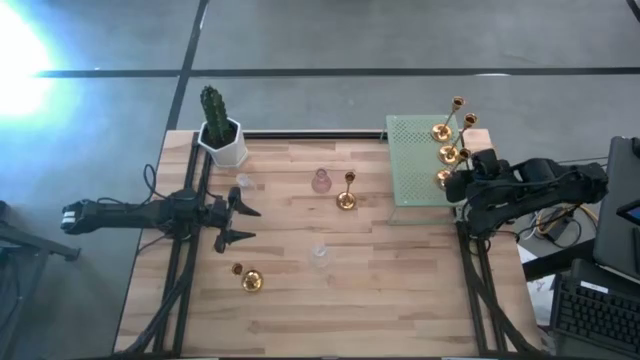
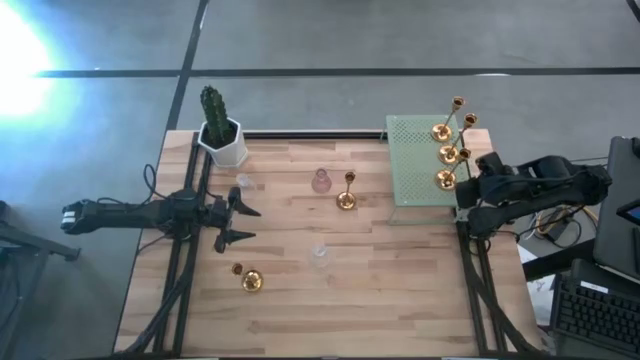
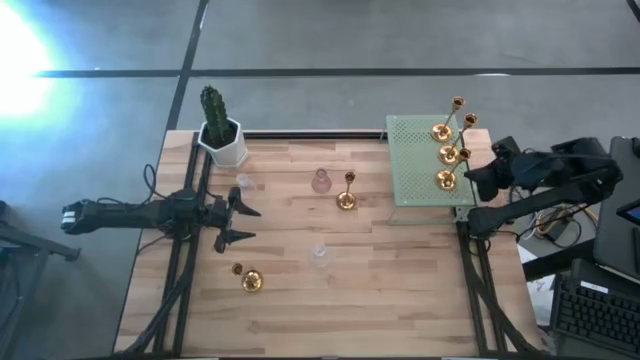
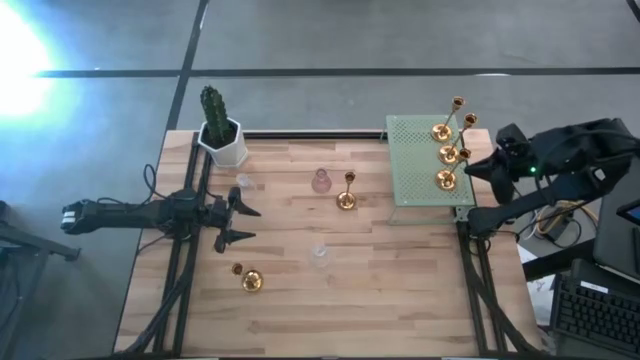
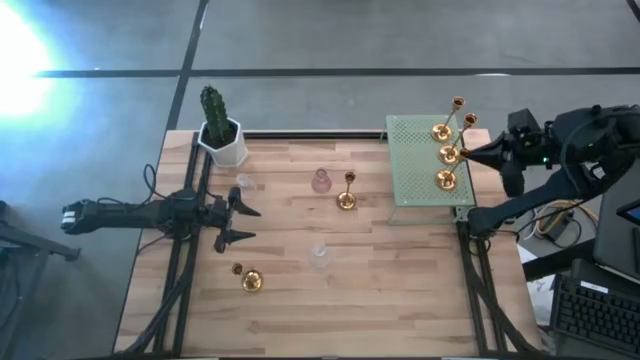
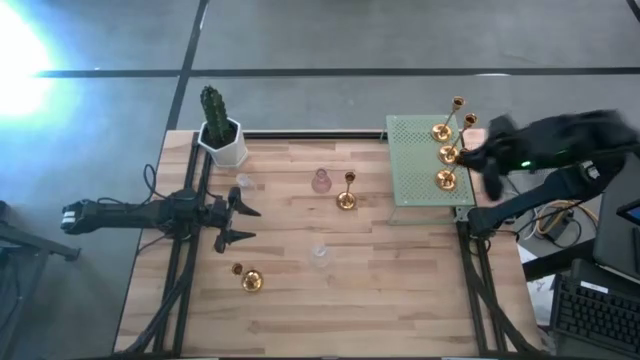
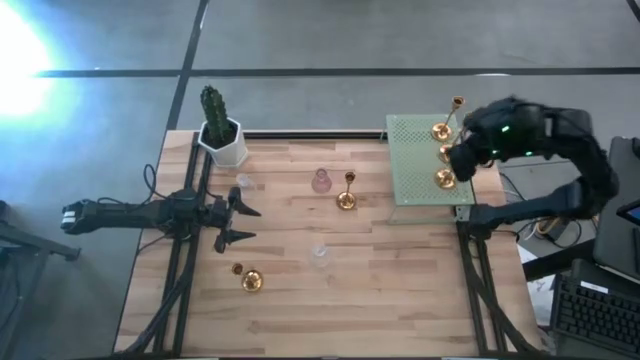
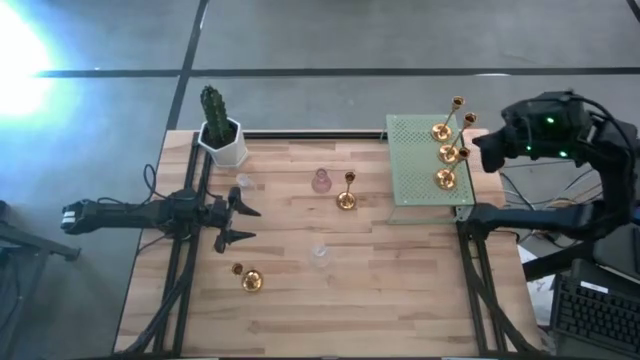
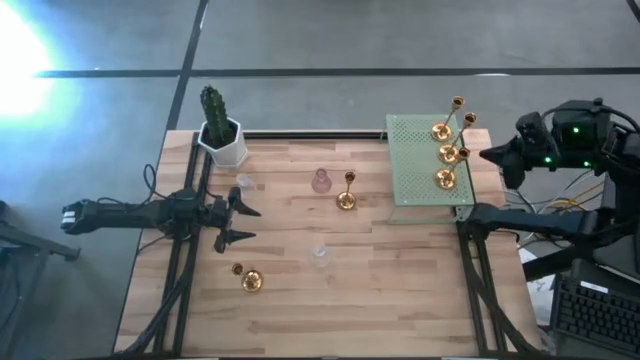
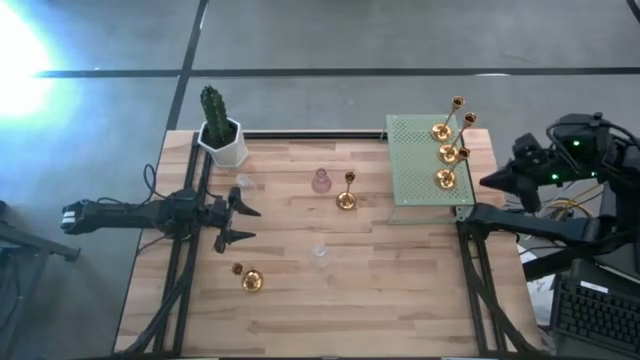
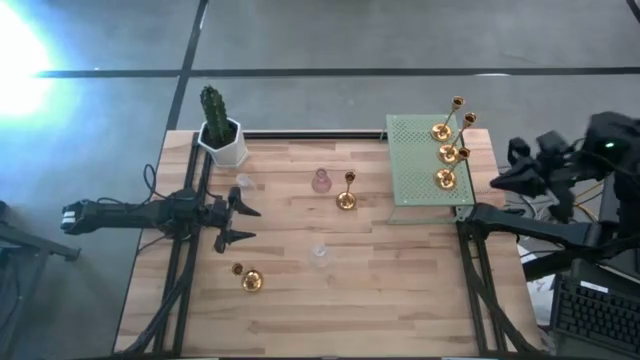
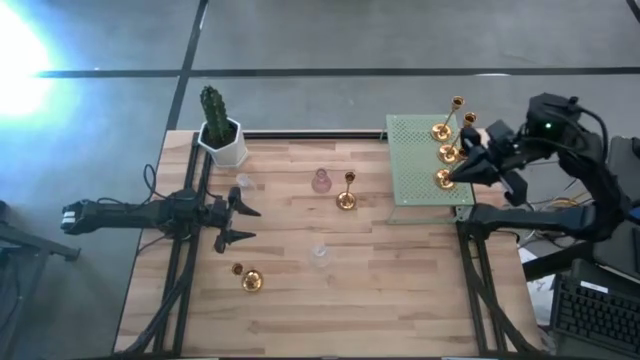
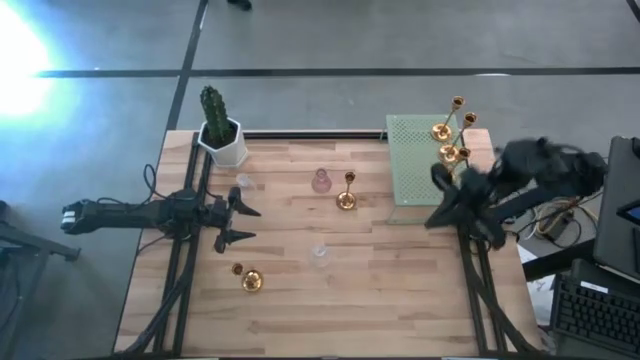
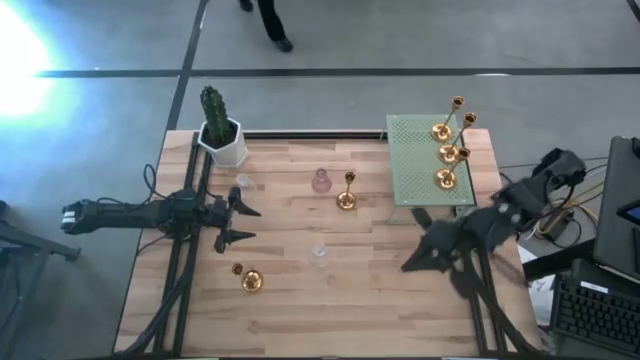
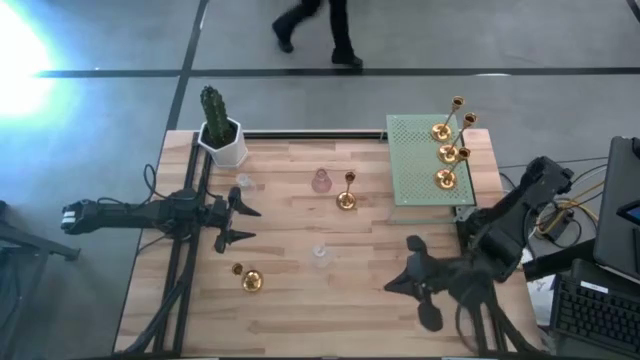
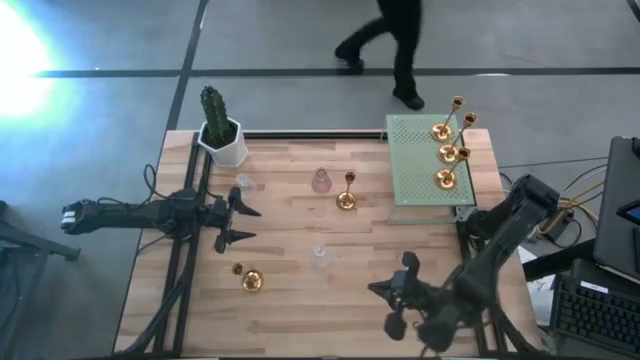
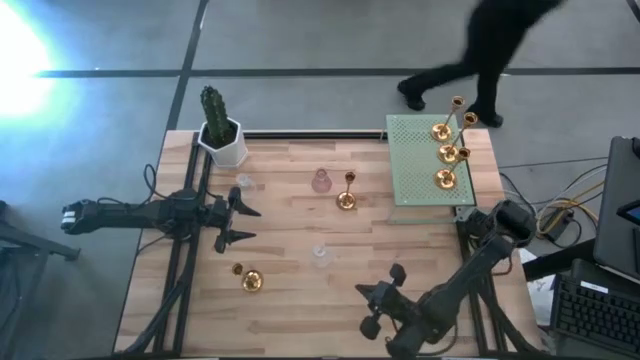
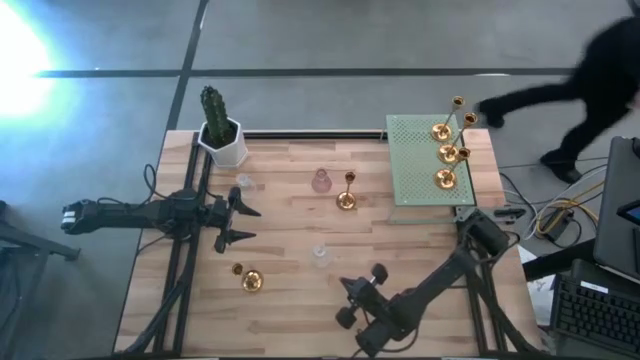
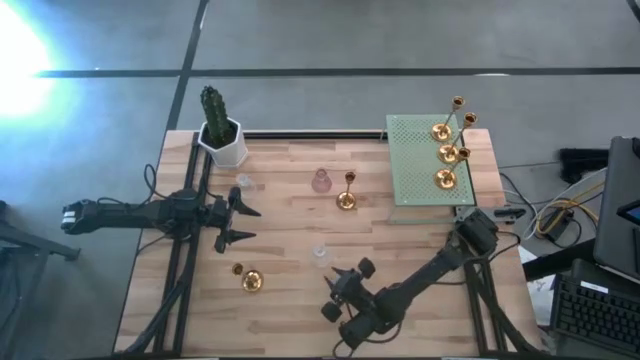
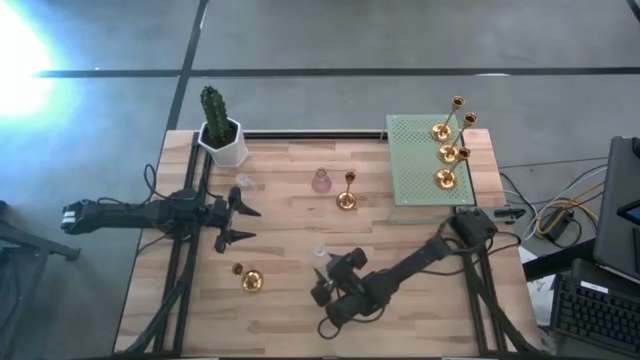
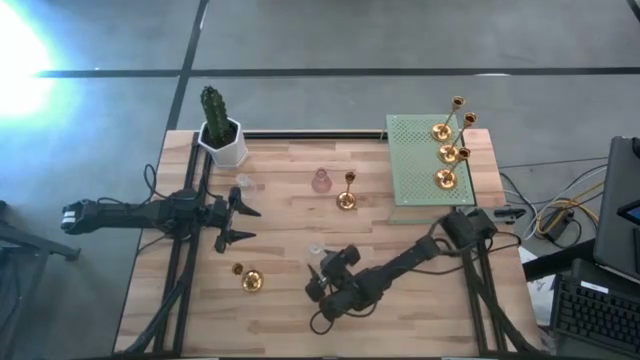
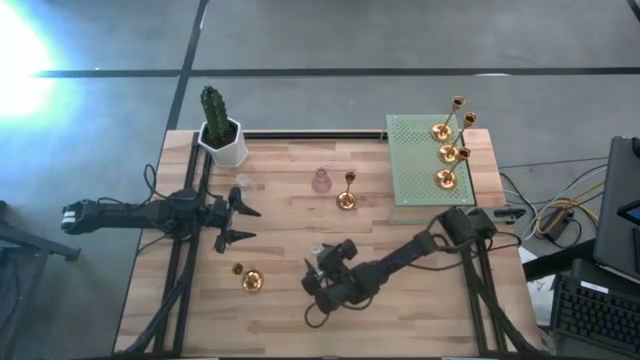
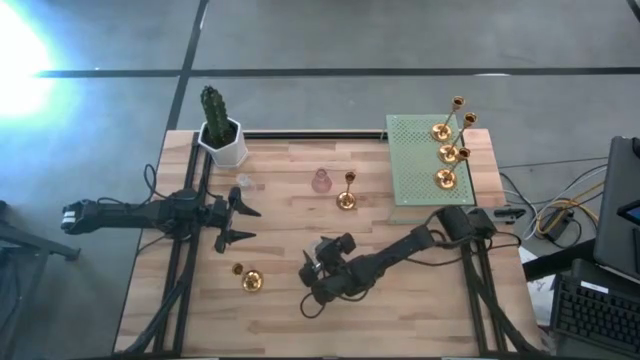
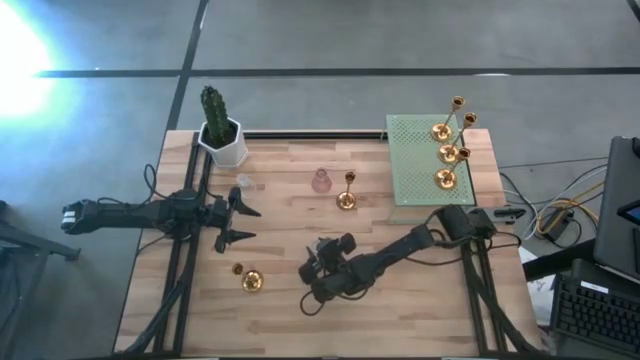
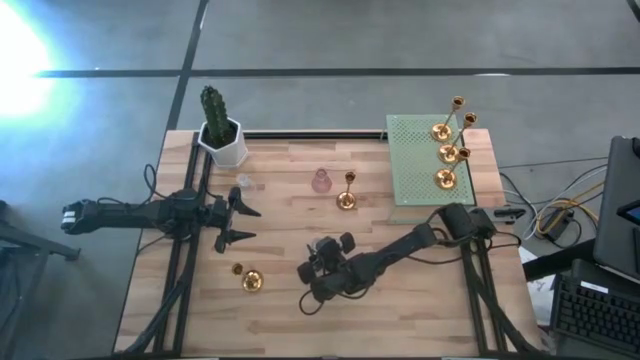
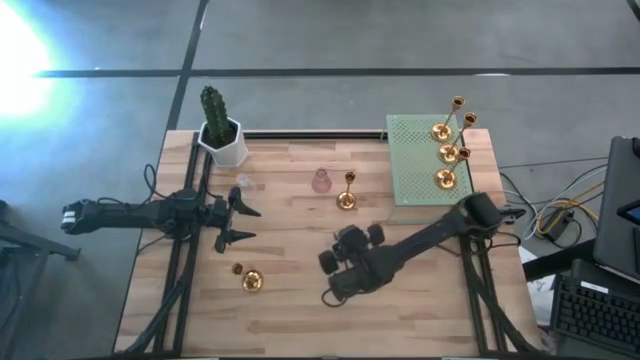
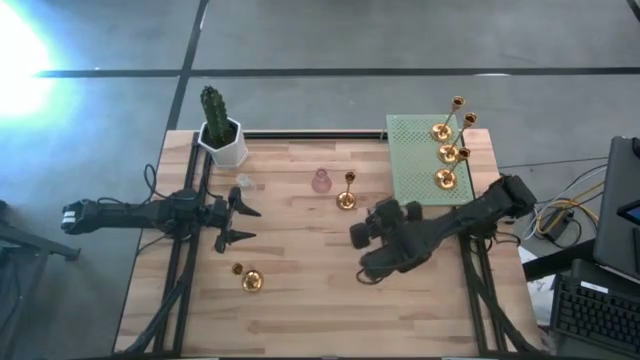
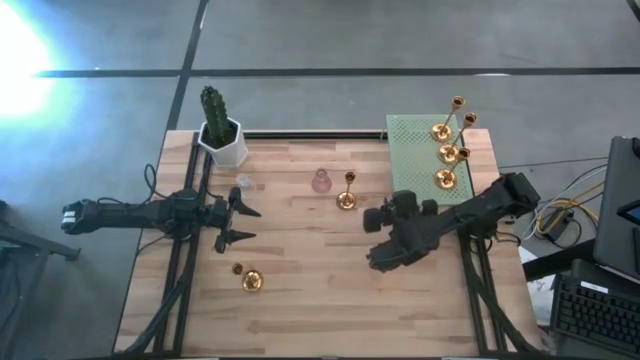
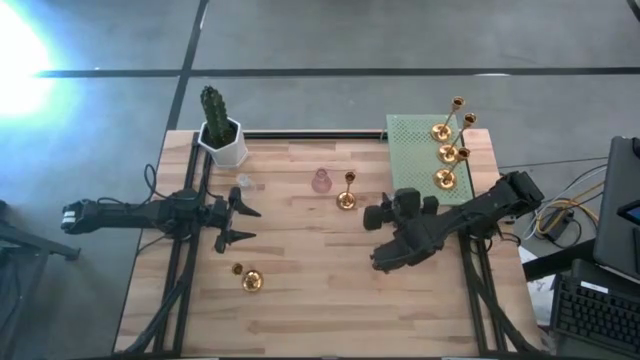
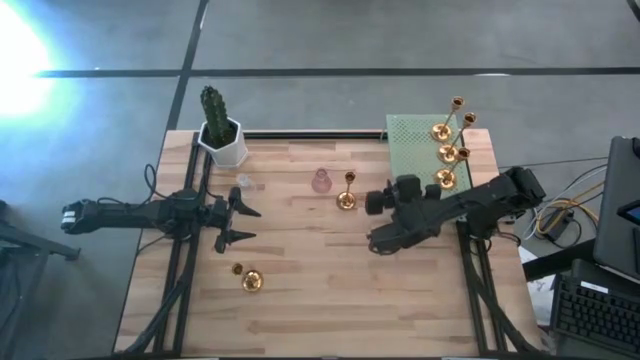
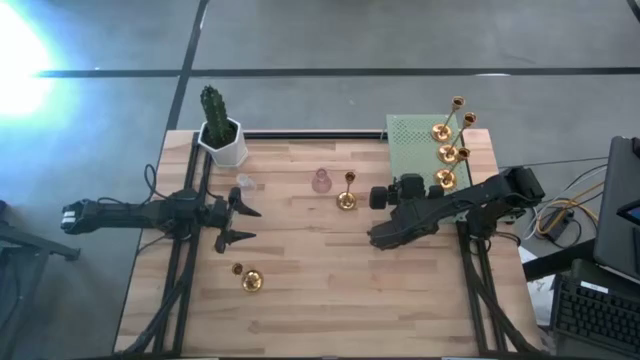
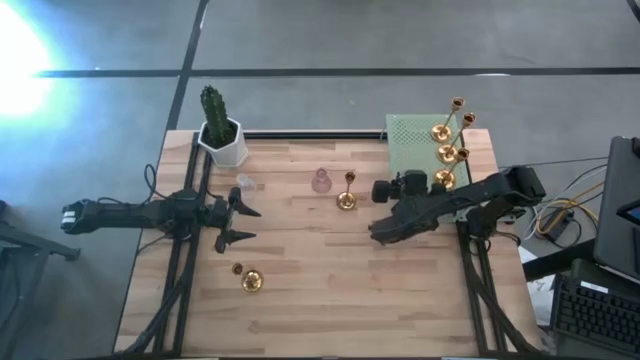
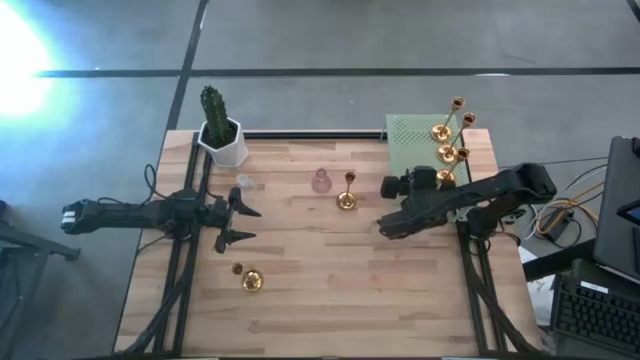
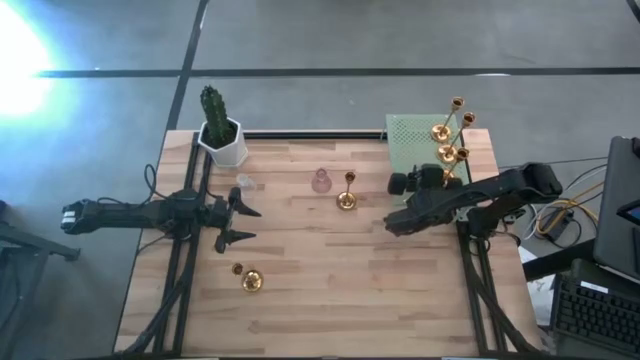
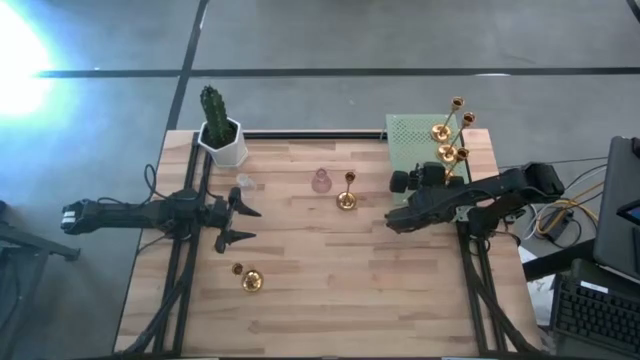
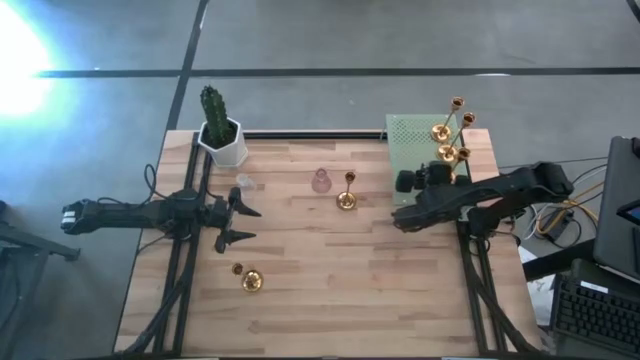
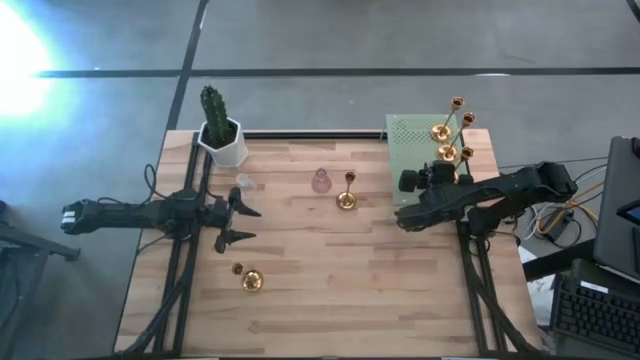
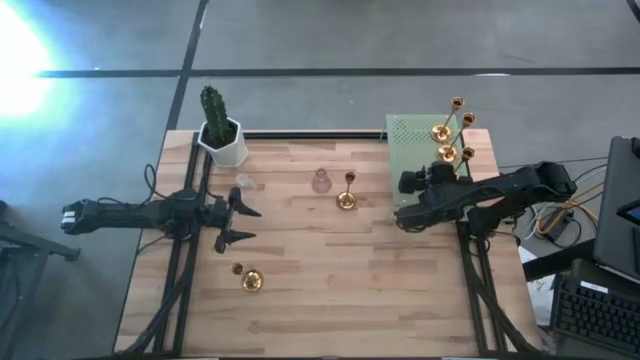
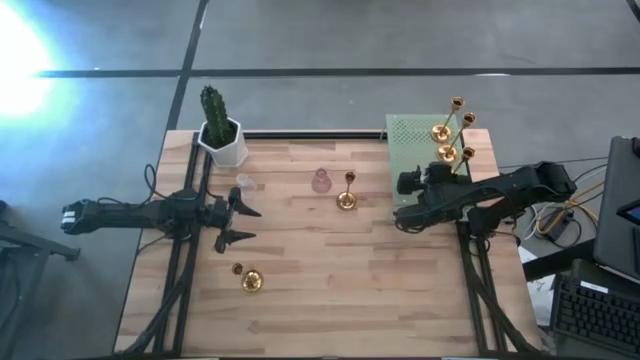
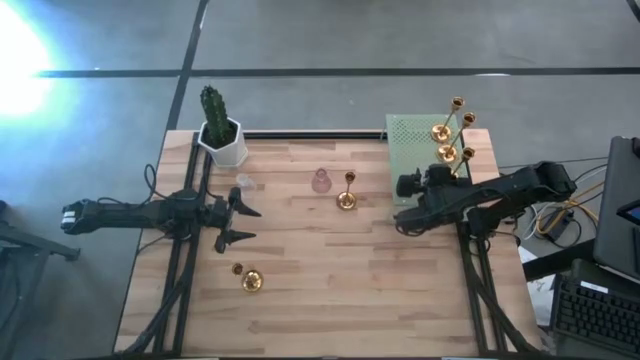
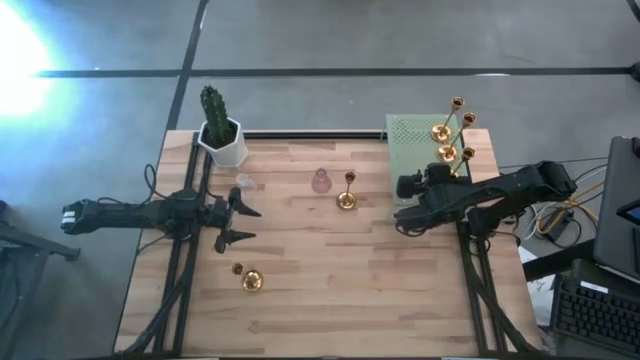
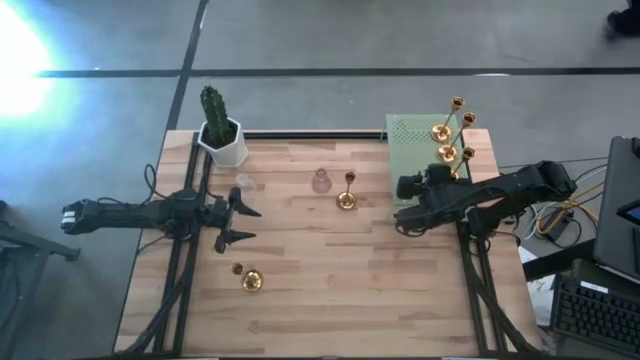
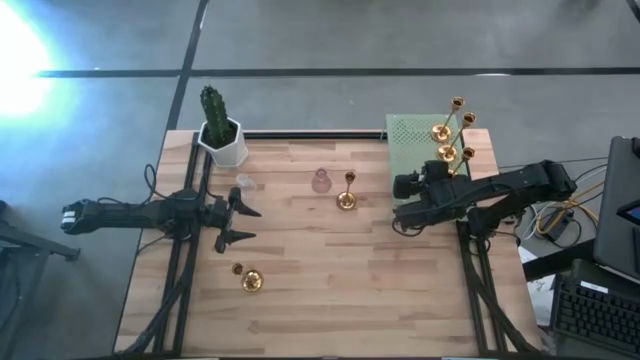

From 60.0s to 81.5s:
Task: Pick & Place candle stick holders
Put the bottom transparent glass candle holder on the shelf
